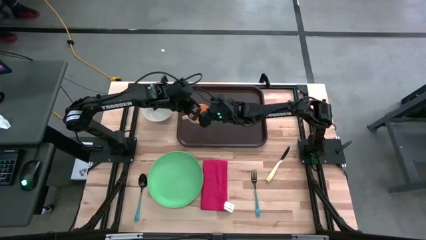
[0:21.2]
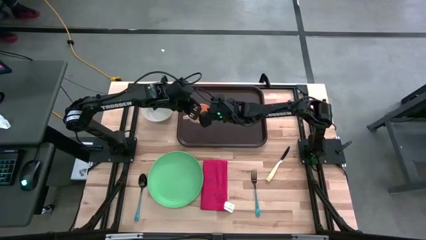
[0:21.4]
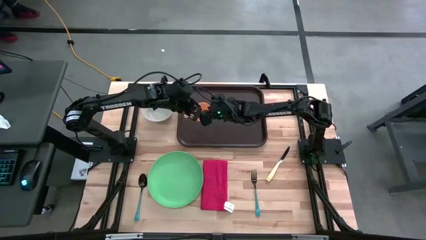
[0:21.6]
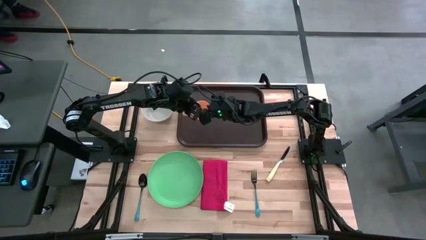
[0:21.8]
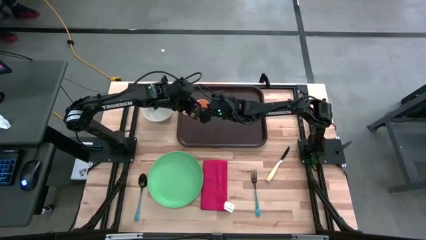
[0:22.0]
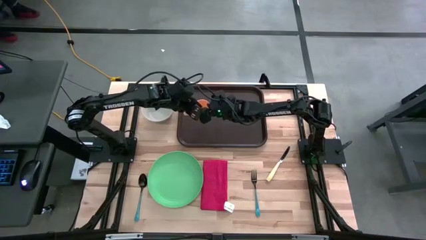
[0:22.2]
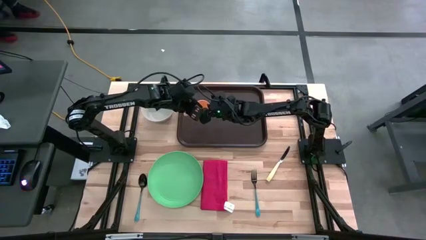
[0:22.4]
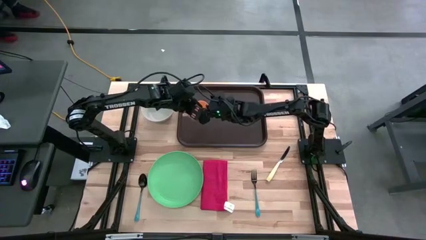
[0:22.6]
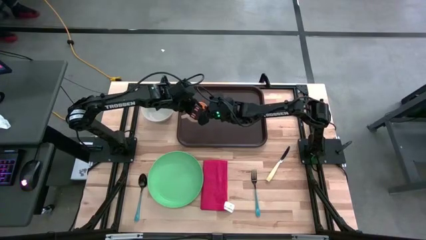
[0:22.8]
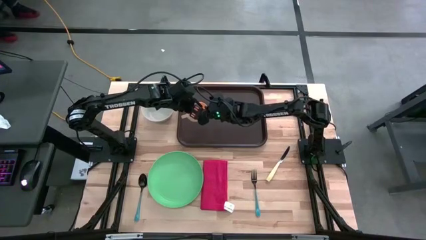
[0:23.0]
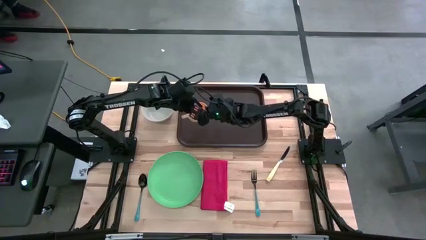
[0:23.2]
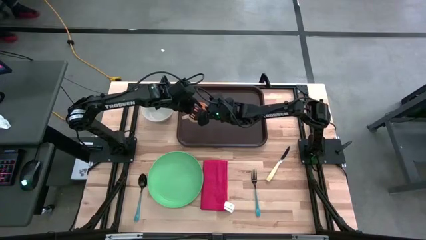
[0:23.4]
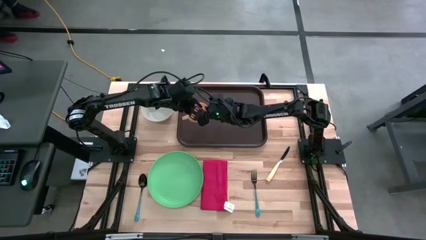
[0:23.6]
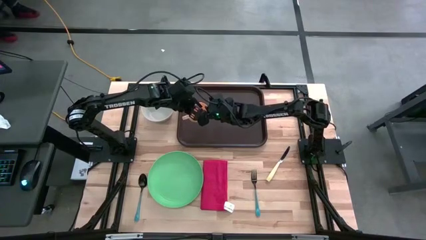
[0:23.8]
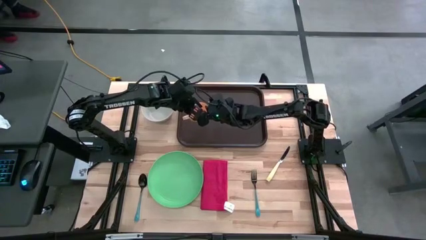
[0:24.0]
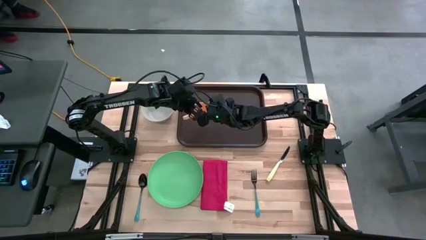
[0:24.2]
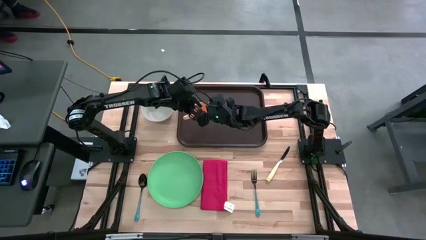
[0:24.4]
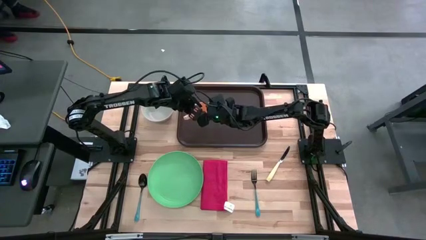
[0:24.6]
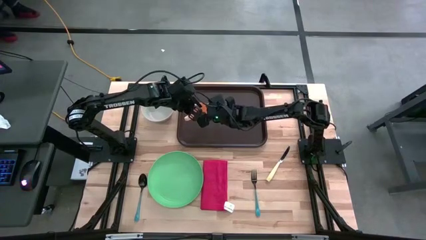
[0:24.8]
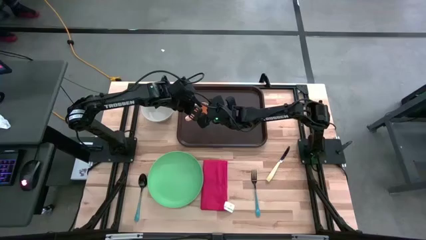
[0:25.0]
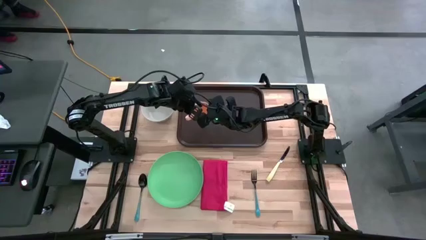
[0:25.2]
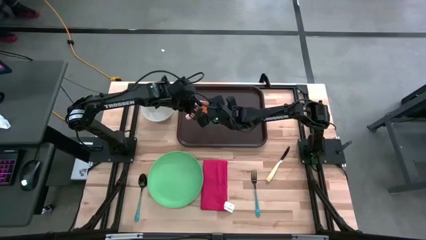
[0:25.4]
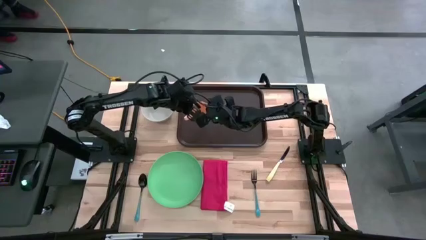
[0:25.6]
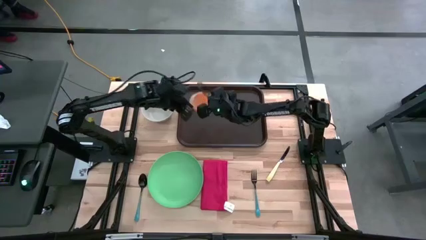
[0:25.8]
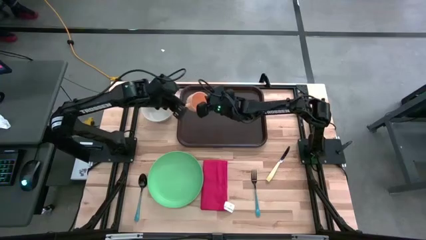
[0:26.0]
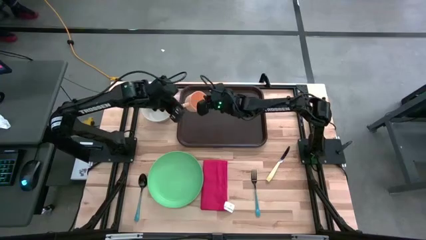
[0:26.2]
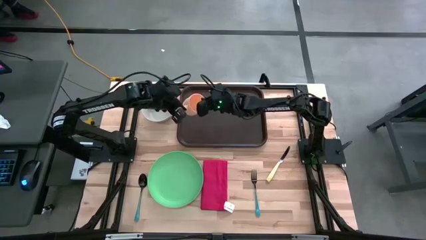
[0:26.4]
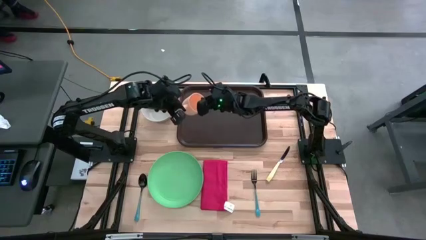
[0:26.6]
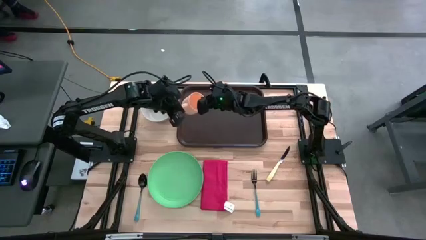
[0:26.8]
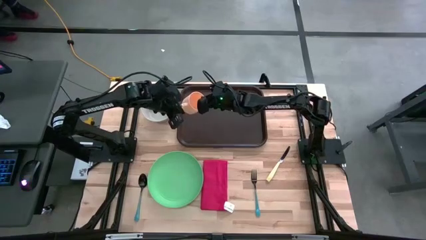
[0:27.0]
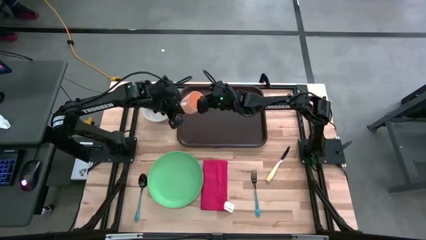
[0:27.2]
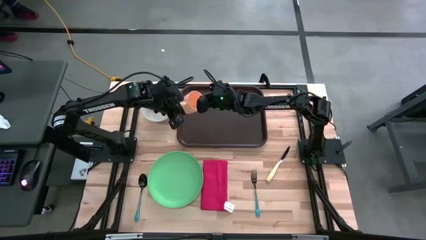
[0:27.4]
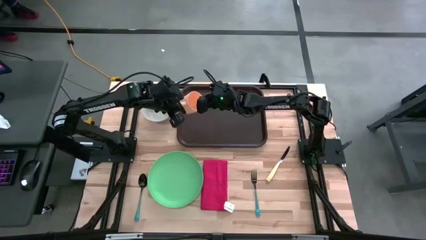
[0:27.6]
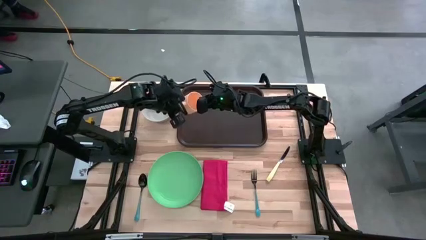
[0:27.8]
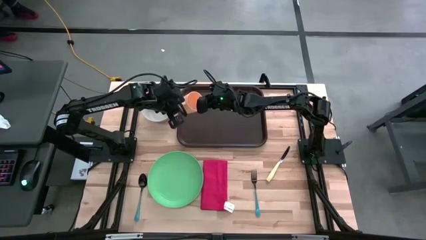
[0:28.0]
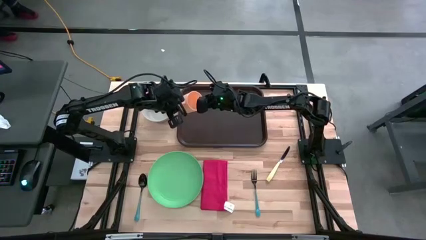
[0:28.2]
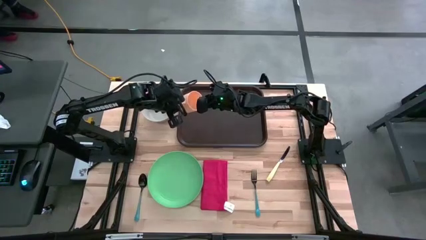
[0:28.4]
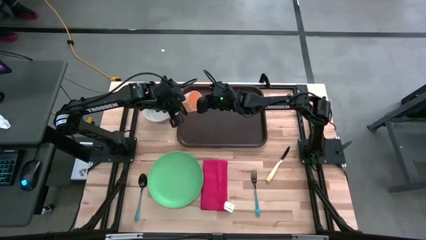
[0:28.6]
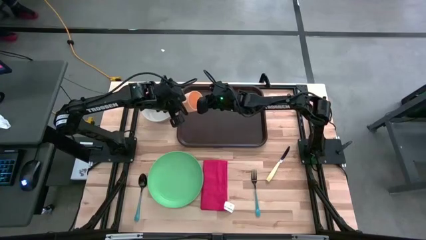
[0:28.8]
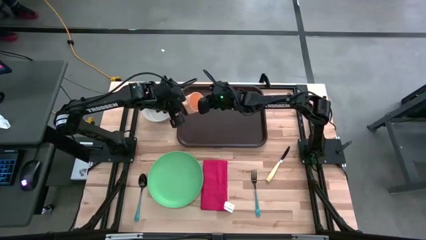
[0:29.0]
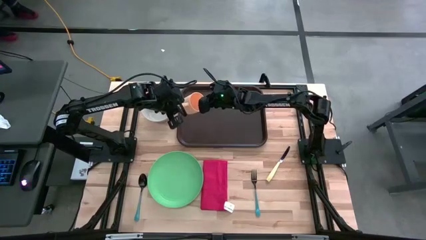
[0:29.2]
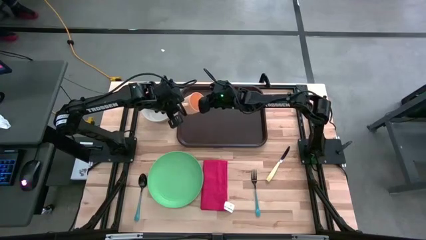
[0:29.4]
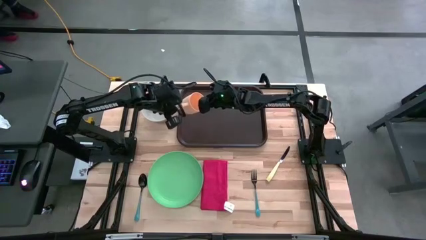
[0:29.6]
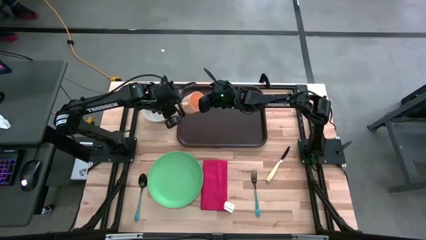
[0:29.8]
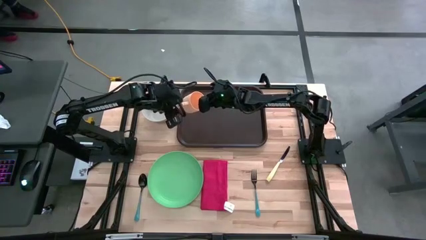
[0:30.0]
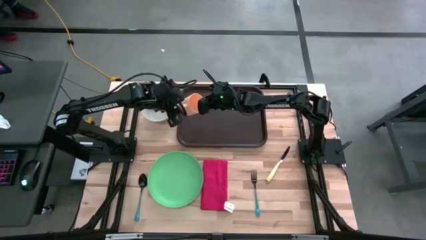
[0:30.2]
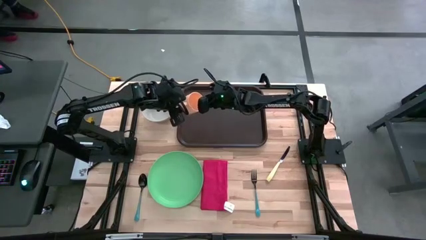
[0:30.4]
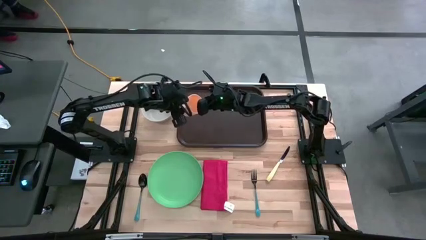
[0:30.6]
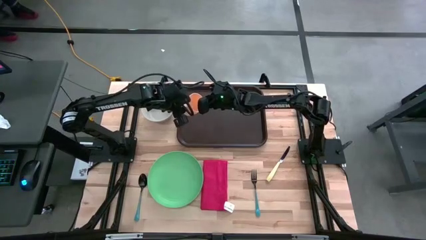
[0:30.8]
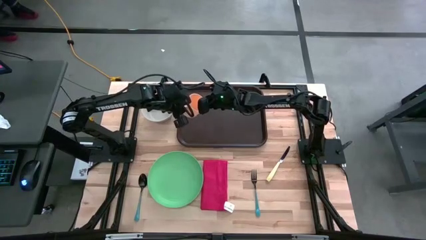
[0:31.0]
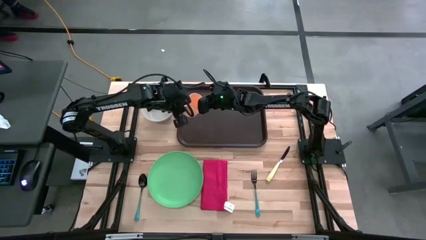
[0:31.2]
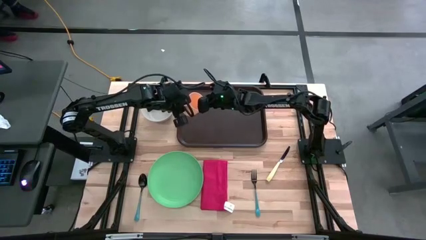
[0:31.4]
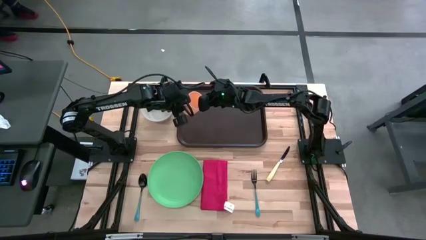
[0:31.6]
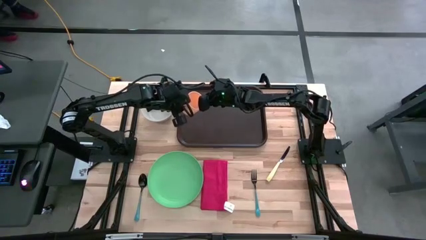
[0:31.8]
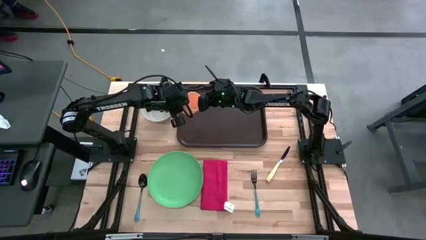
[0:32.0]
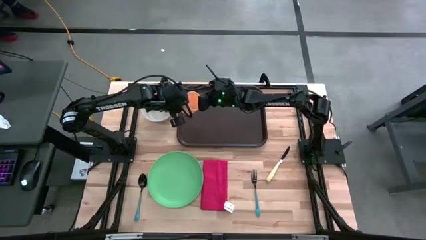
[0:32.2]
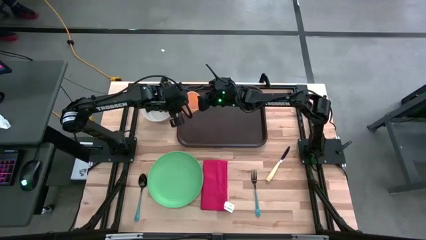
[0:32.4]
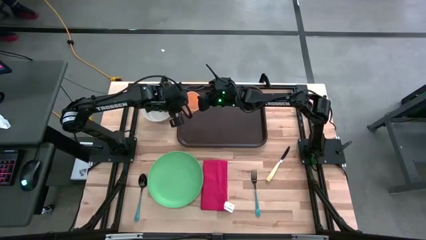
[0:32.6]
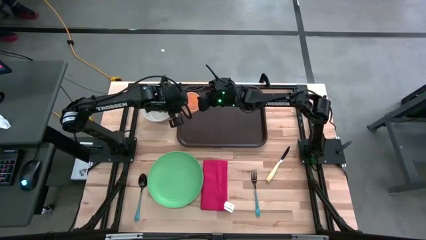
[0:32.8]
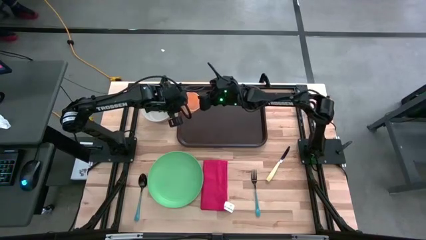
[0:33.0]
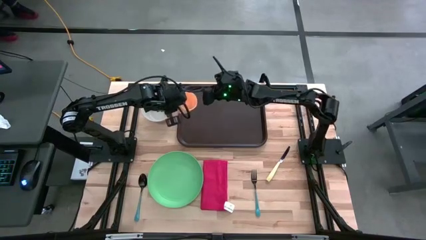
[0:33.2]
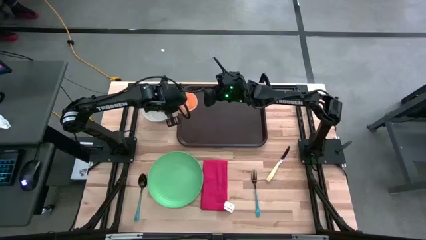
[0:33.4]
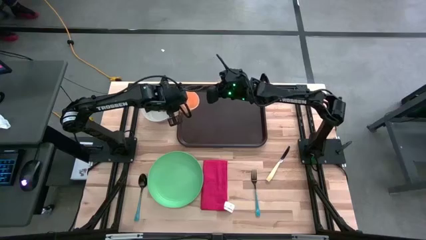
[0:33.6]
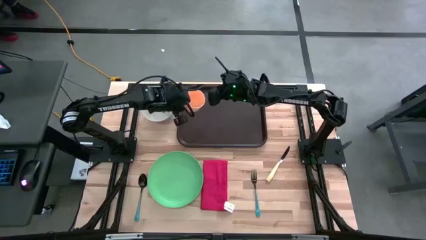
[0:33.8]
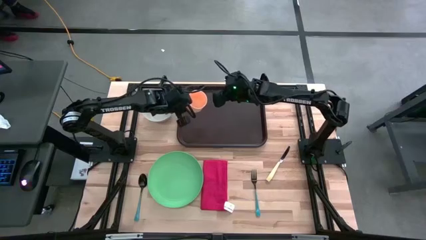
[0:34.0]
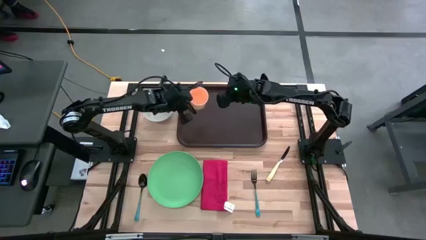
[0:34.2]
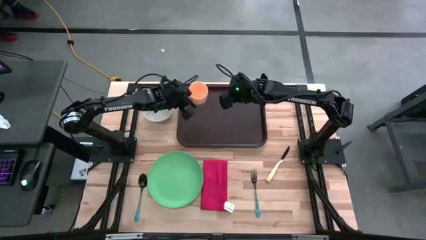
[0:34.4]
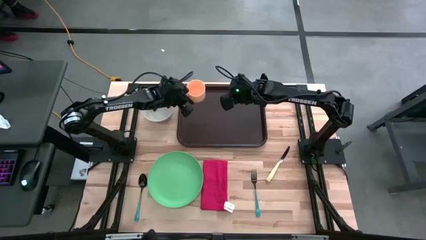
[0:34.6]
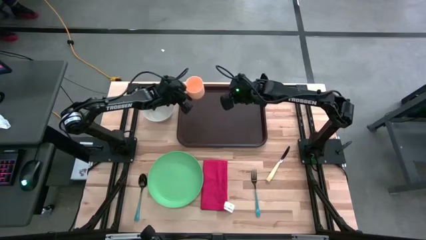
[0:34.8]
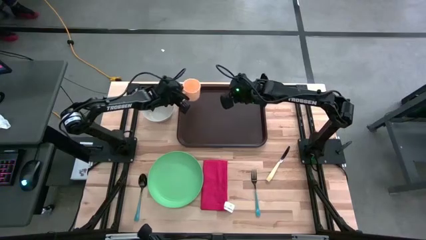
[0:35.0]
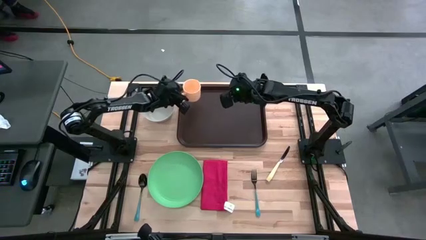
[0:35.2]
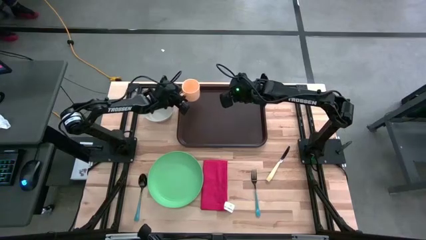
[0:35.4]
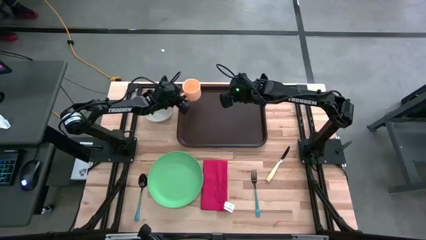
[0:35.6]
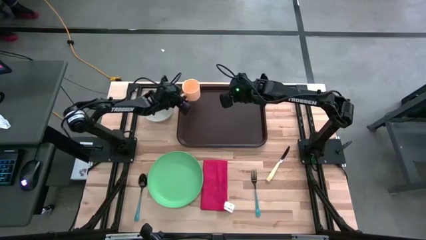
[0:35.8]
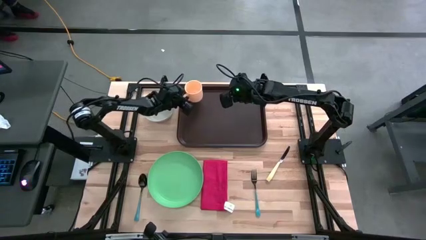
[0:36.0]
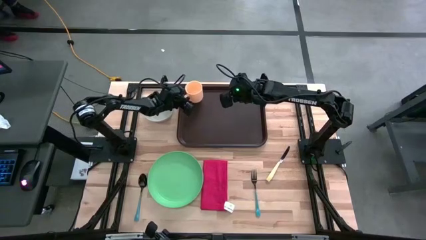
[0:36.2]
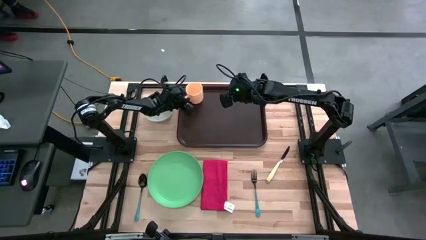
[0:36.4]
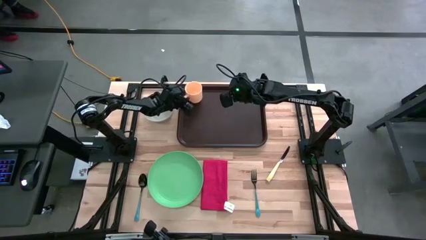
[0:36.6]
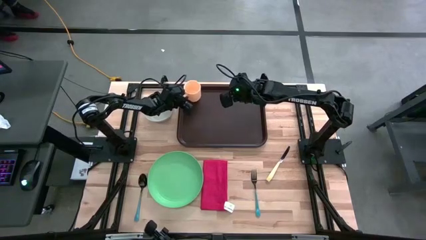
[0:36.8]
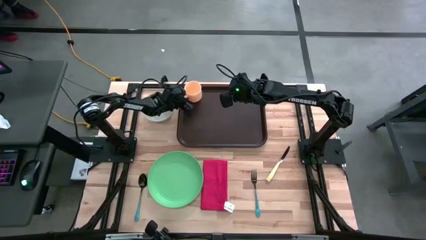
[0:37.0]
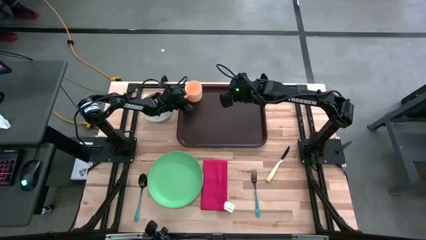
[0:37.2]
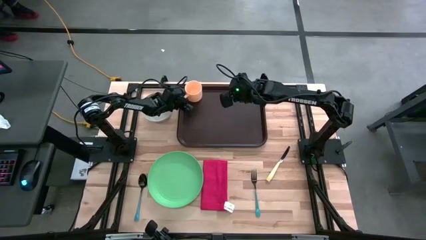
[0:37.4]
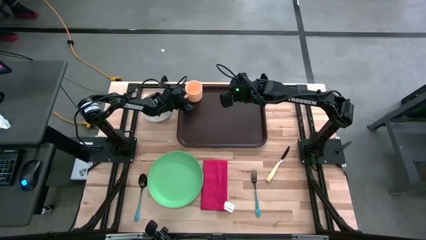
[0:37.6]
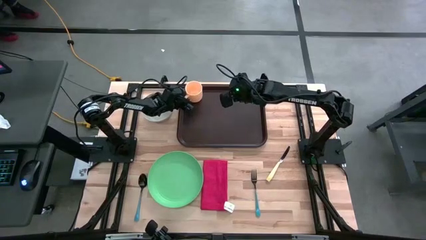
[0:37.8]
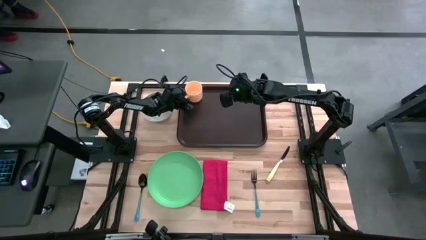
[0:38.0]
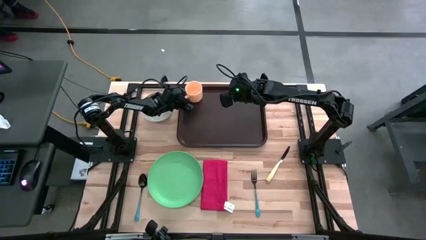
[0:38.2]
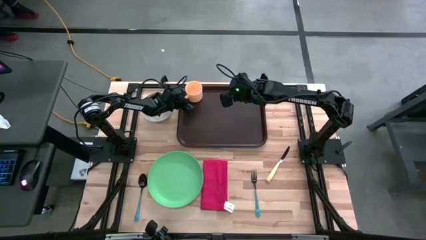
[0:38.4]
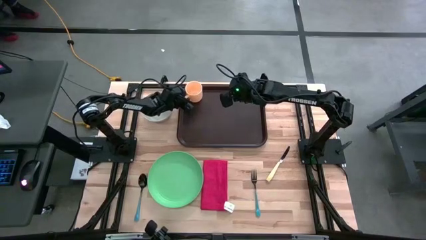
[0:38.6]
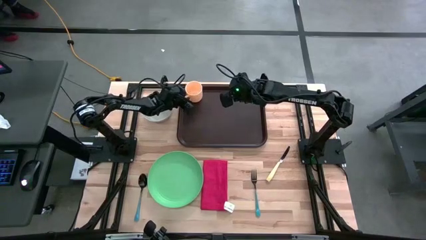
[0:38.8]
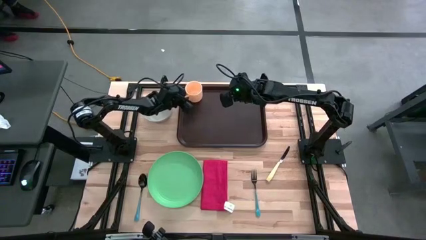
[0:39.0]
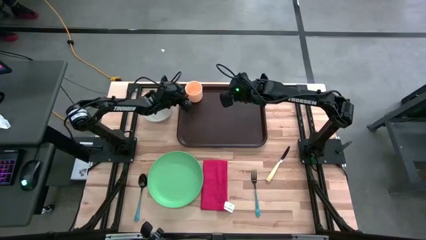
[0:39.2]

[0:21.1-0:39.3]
Task: Set up tray
Put the yellow mug on the brown tray
